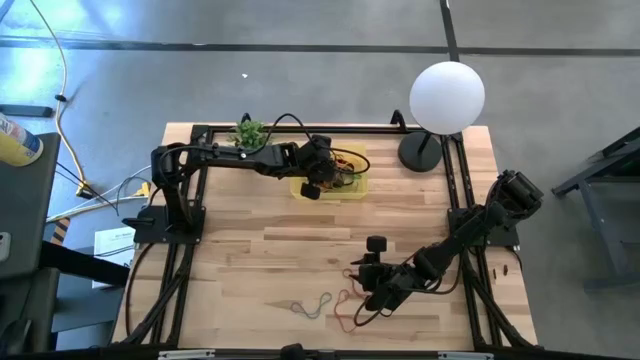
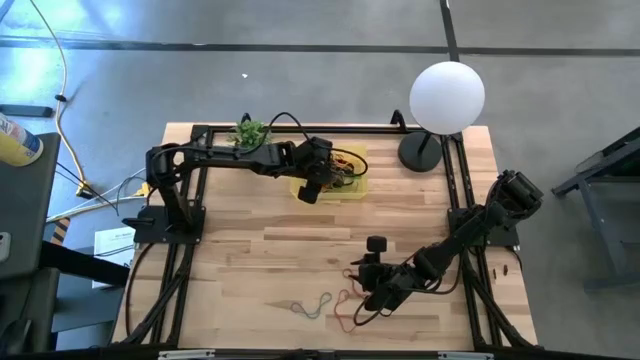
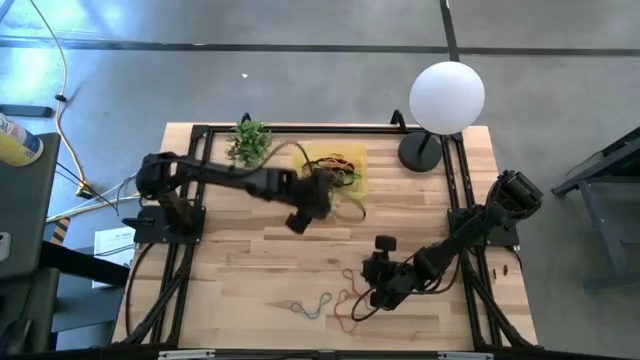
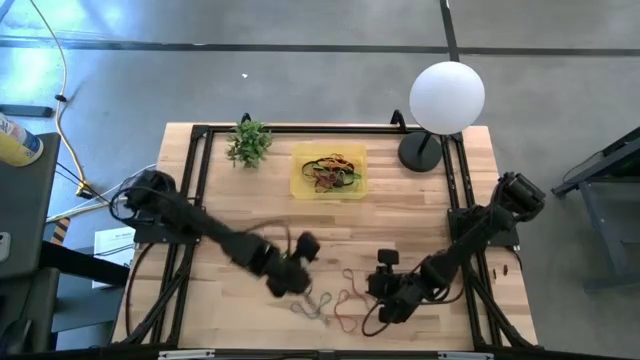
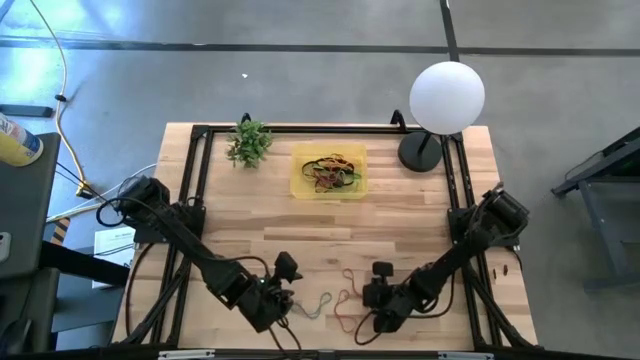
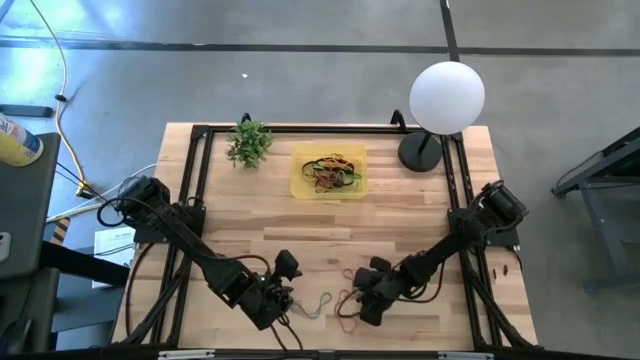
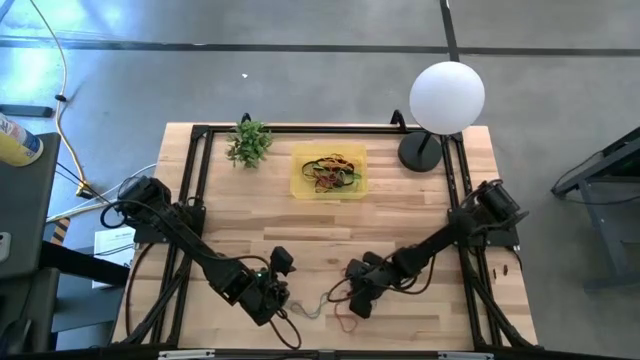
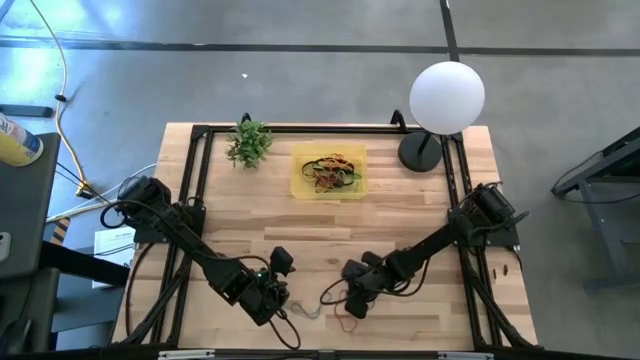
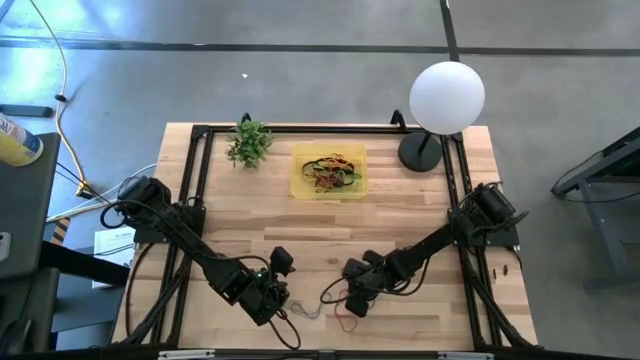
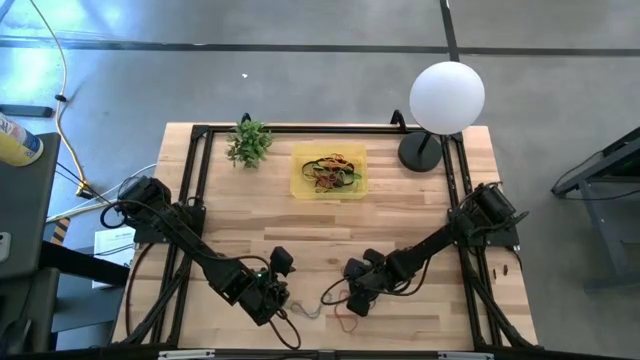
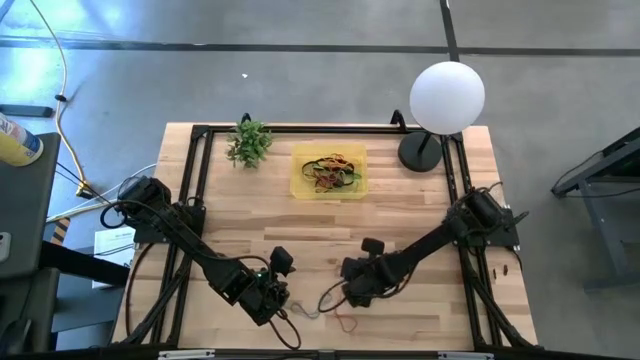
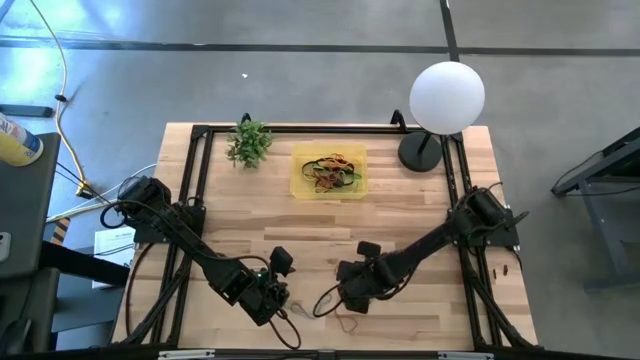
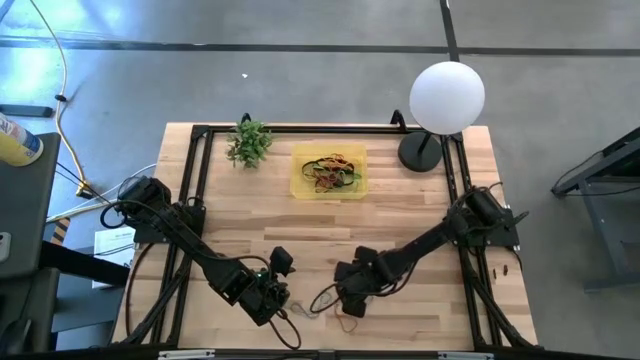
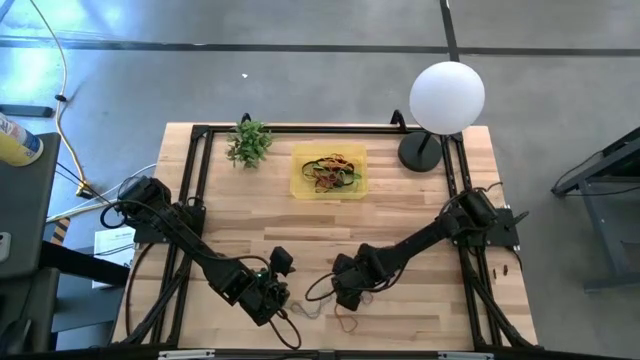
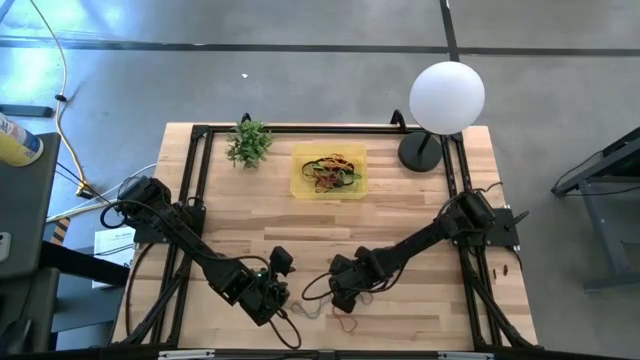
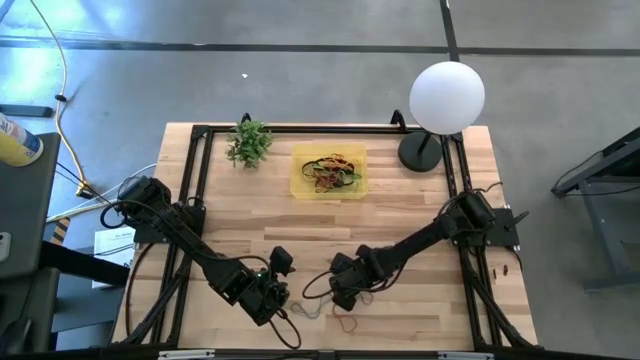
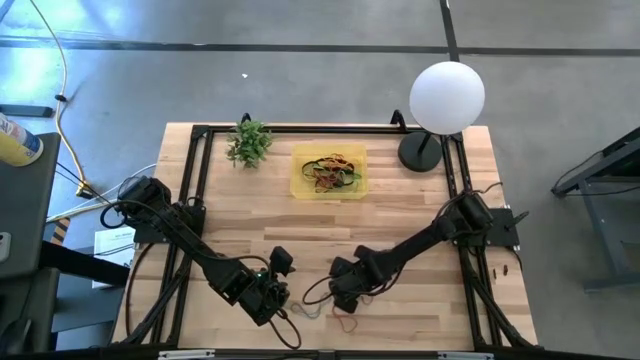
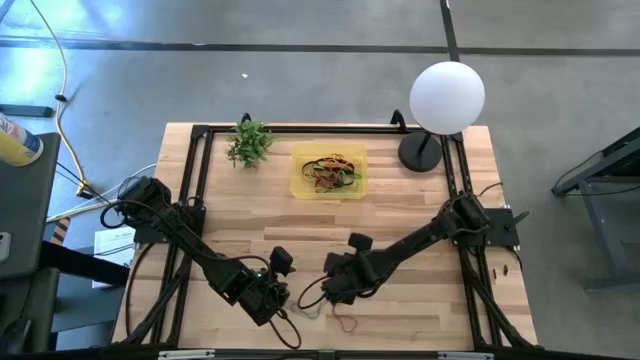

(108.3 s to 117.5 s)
Task: Pick and place rubber bands into bin
Put the top red rubber band into the yellow bin

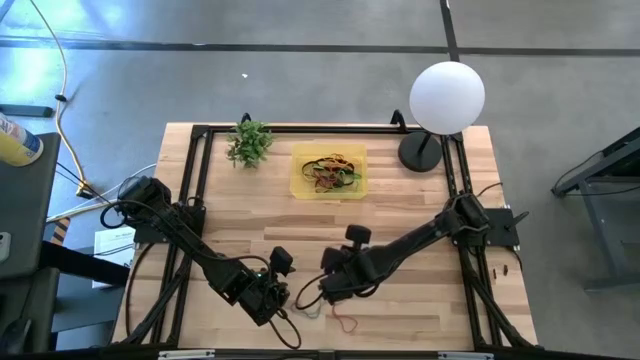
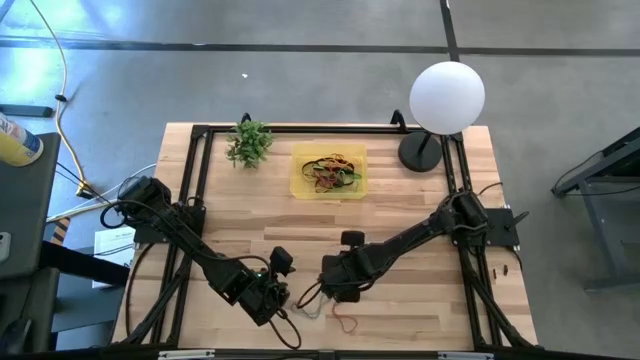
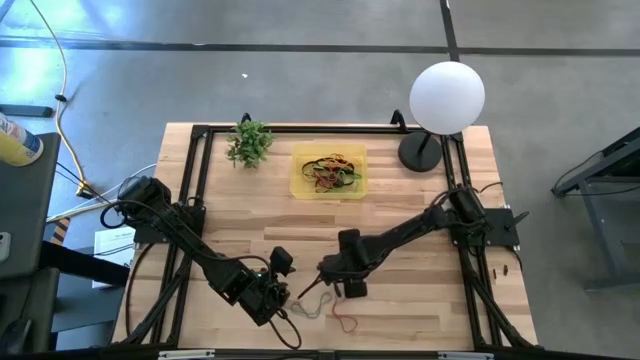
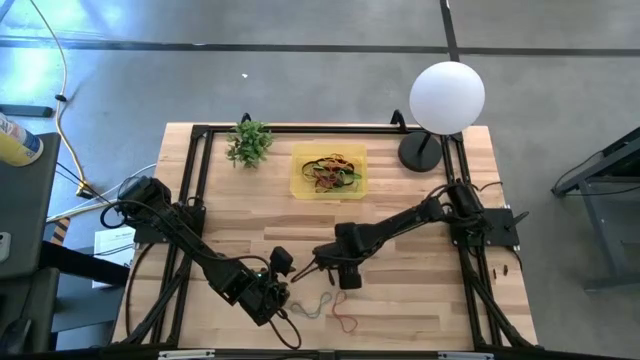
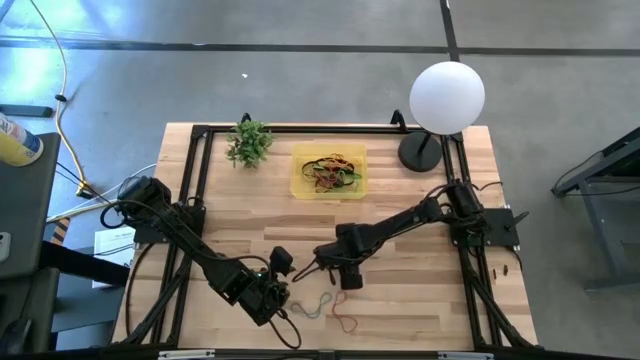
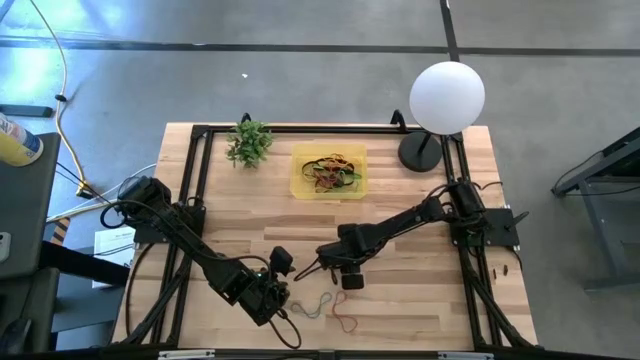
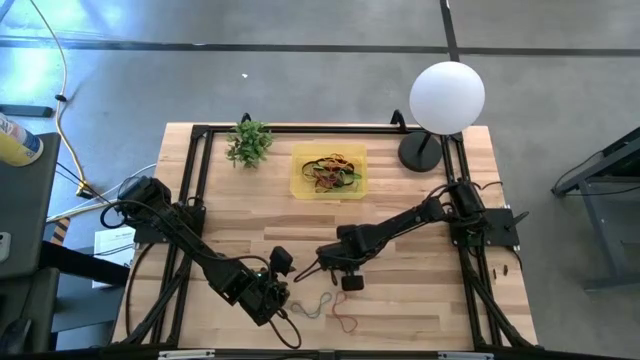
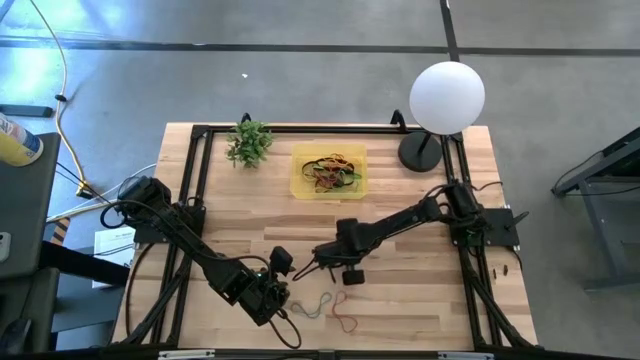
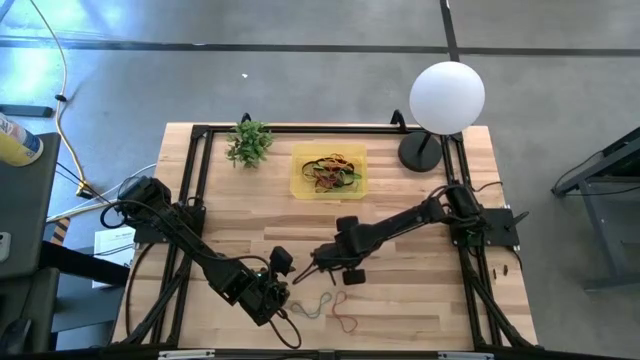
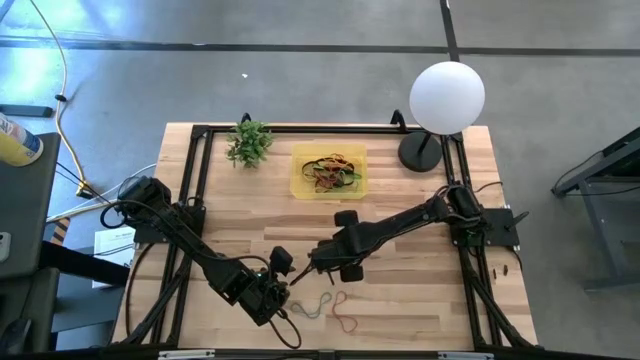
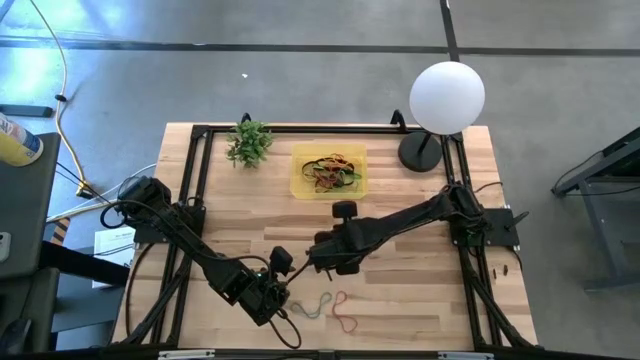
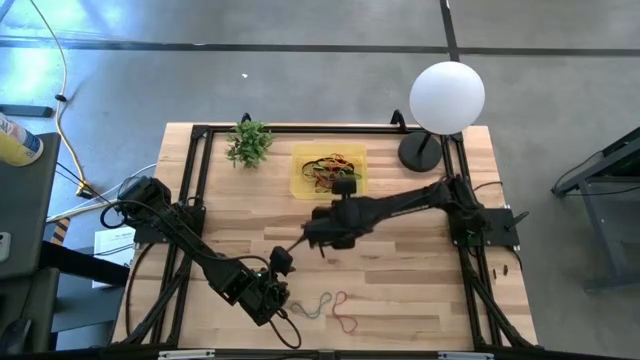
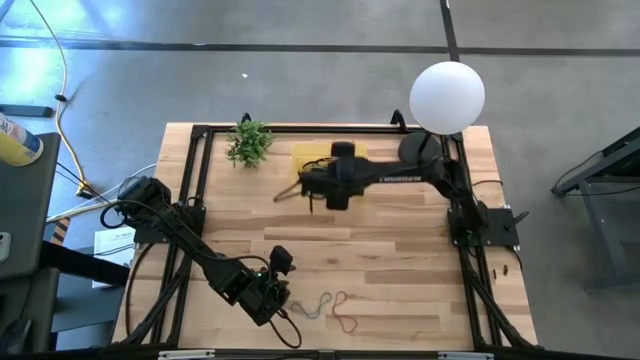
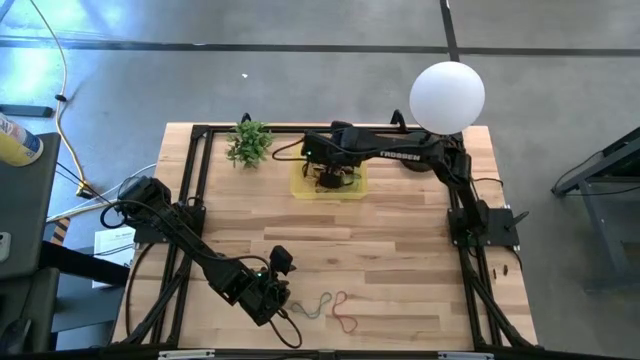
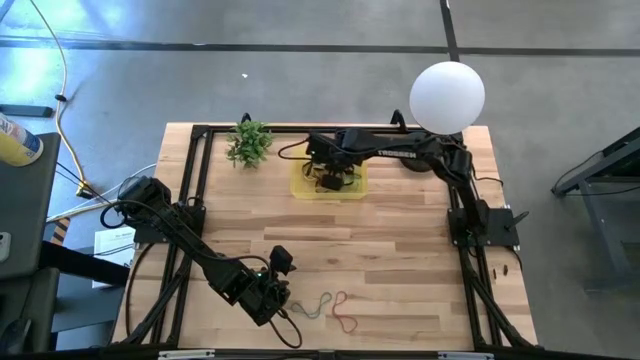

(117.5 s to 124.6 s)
Put the top red rubber band into the yellow bin

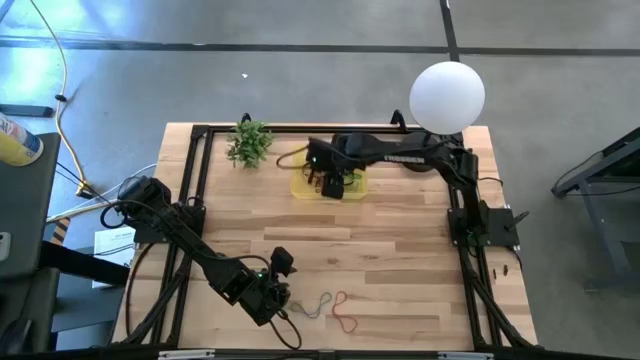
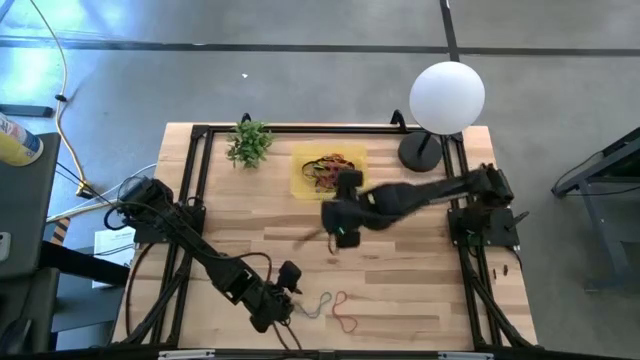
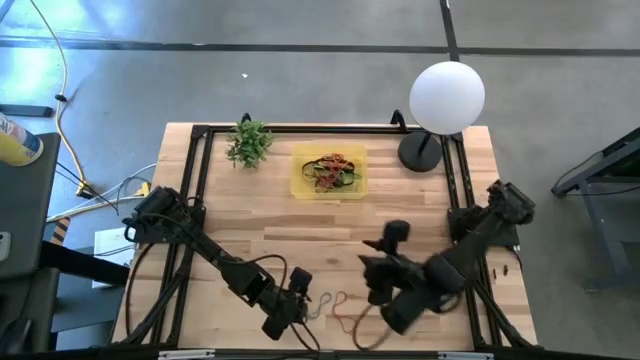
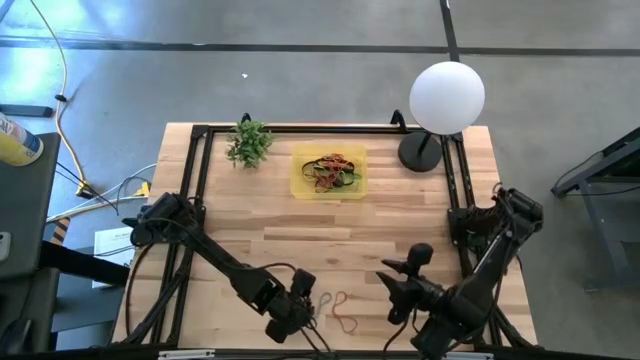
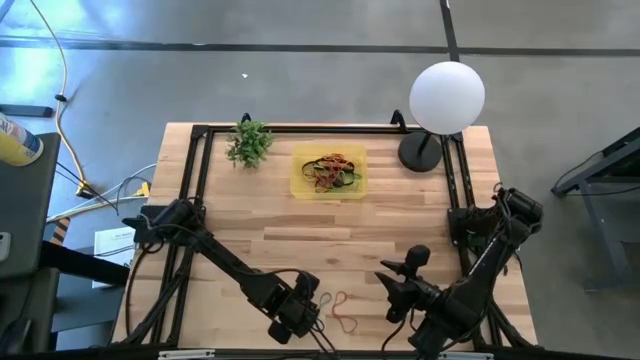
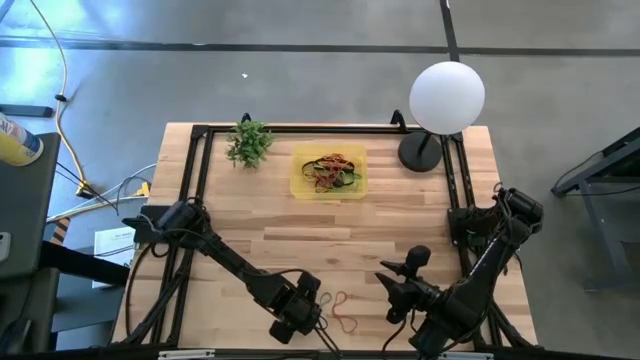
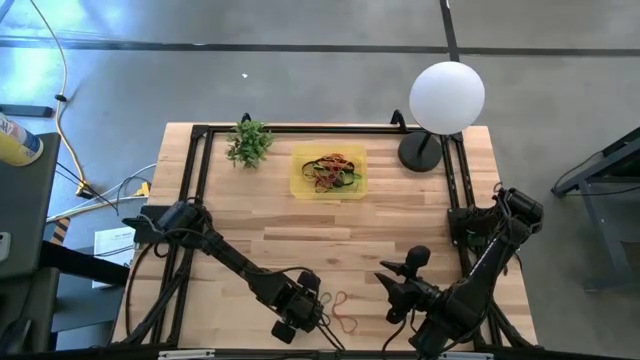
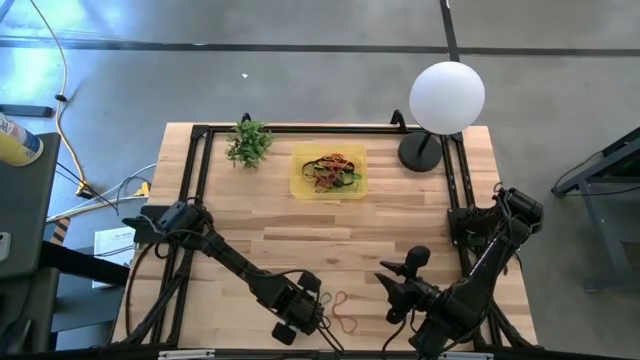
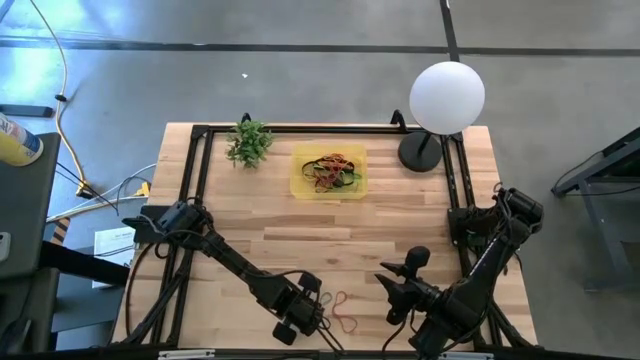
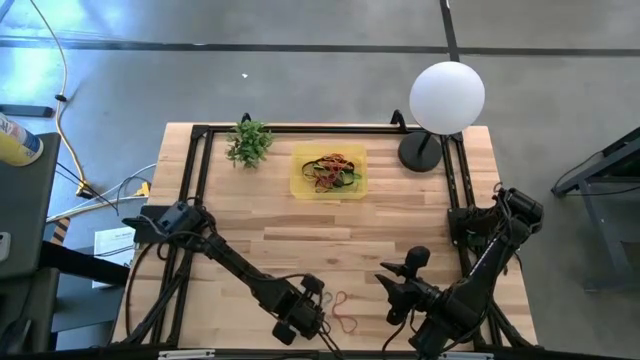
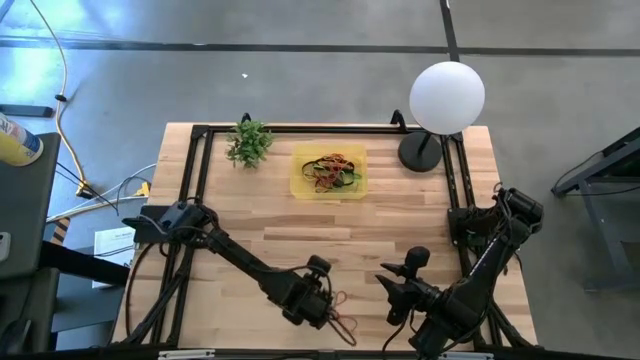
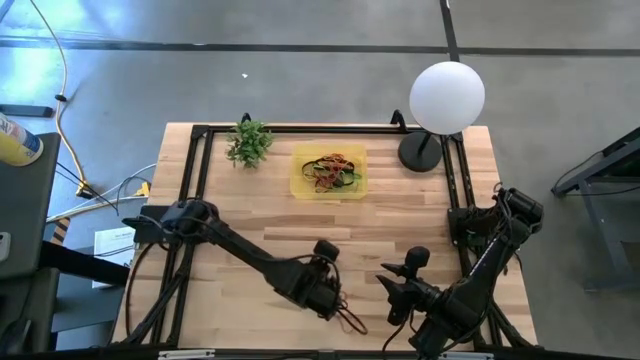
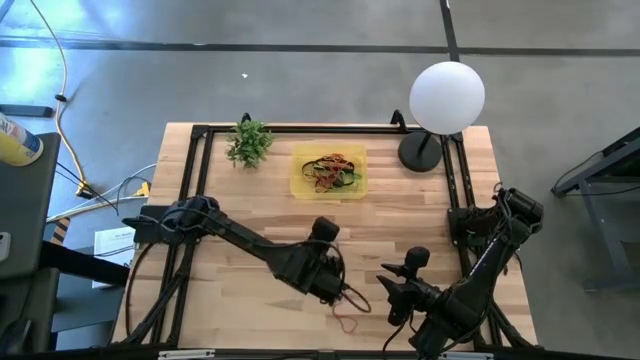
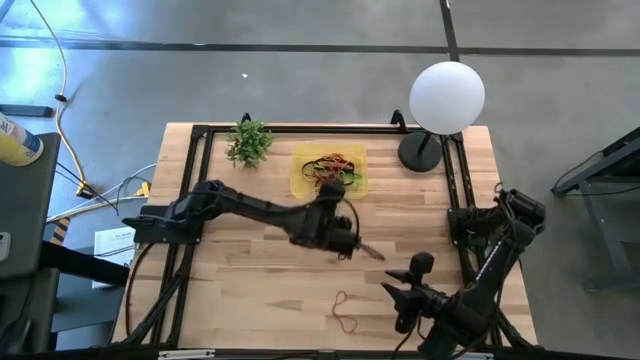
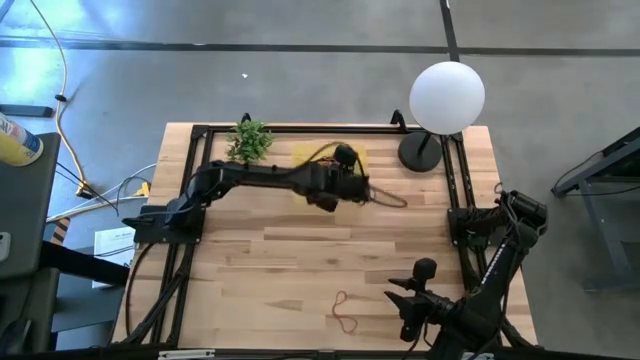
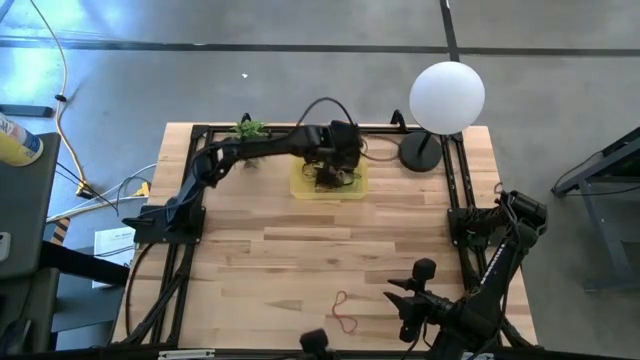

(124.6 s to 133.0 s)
Put the blue rubber band into the yellow bin
